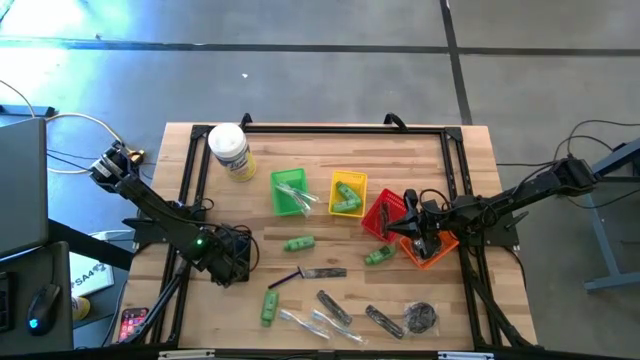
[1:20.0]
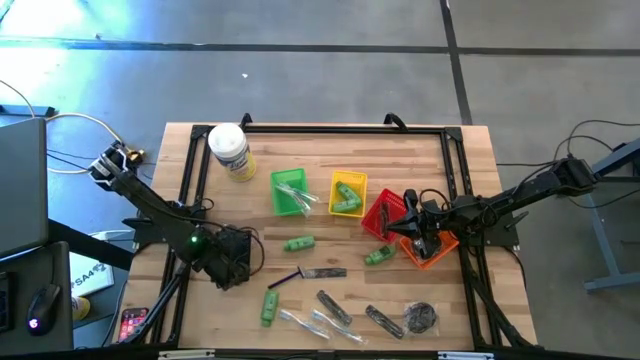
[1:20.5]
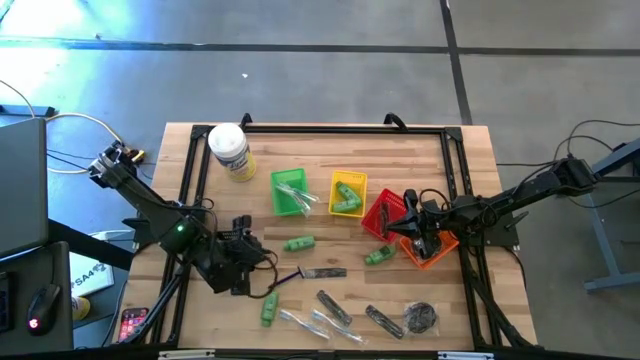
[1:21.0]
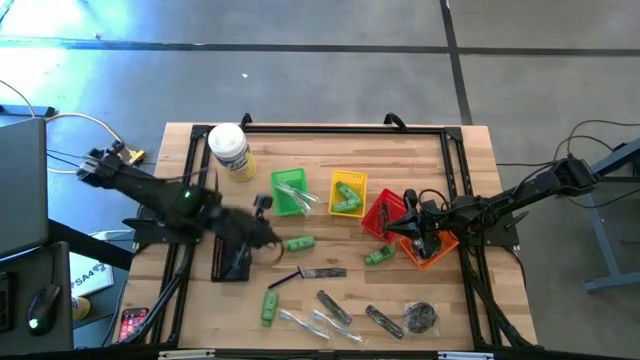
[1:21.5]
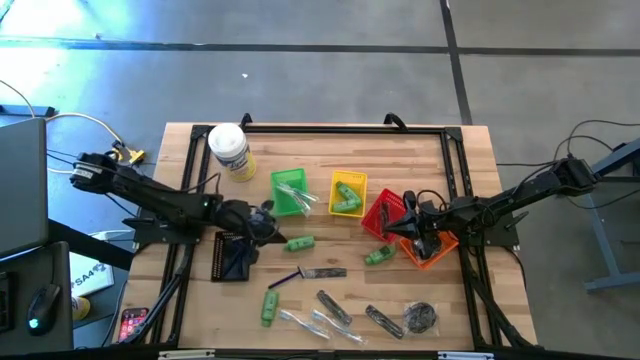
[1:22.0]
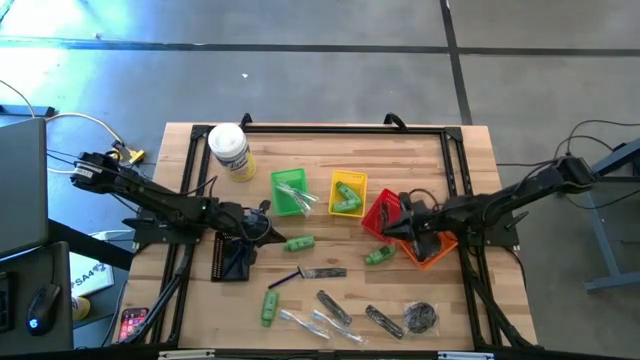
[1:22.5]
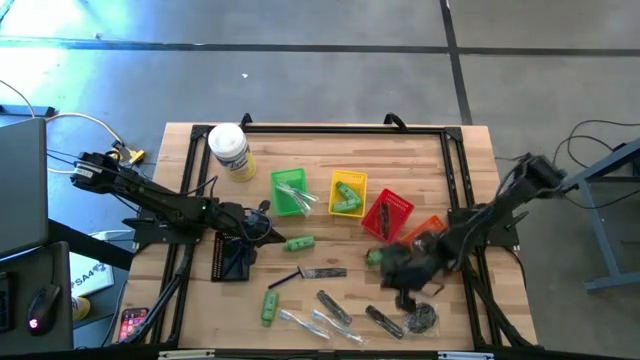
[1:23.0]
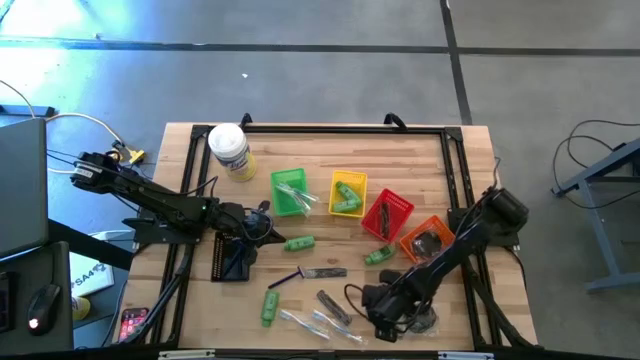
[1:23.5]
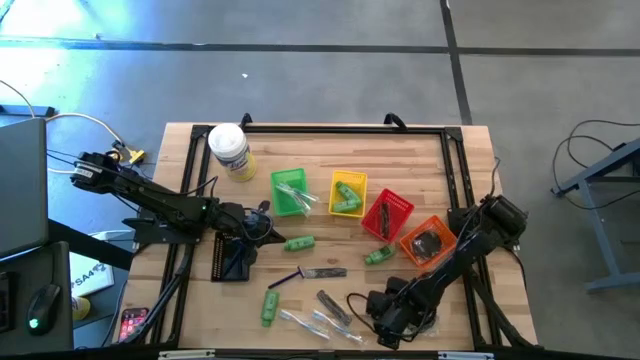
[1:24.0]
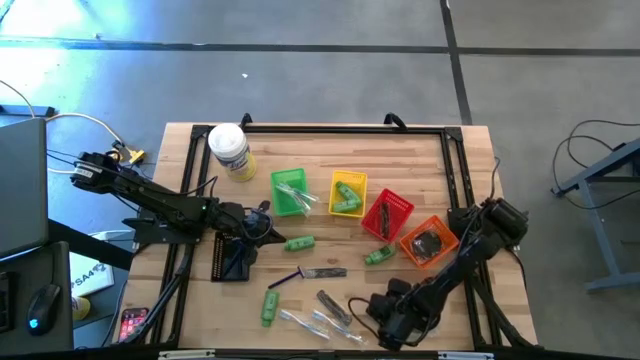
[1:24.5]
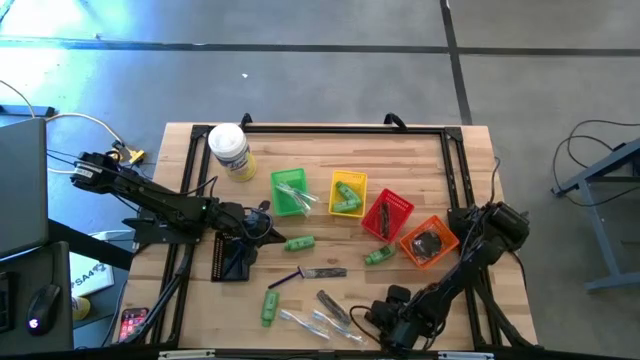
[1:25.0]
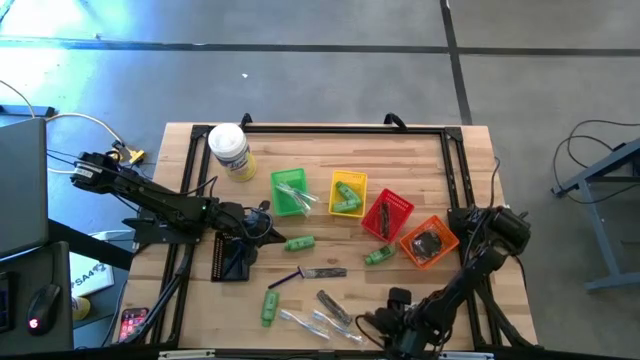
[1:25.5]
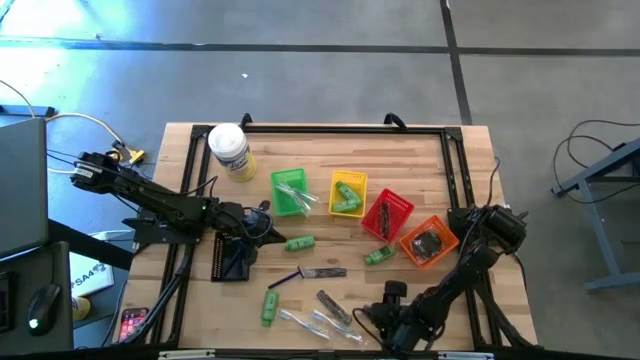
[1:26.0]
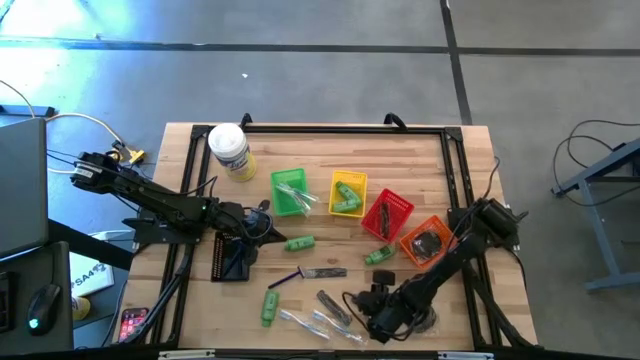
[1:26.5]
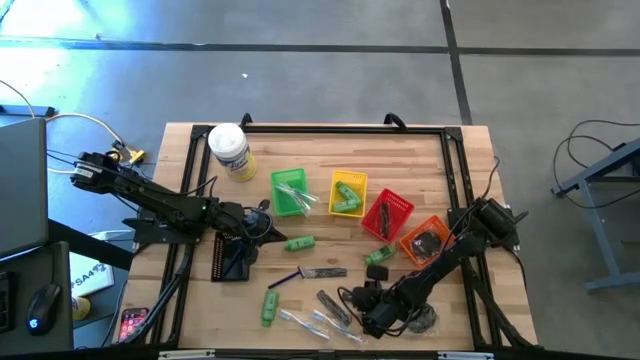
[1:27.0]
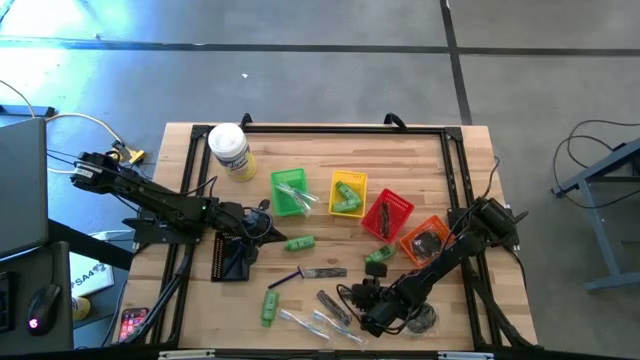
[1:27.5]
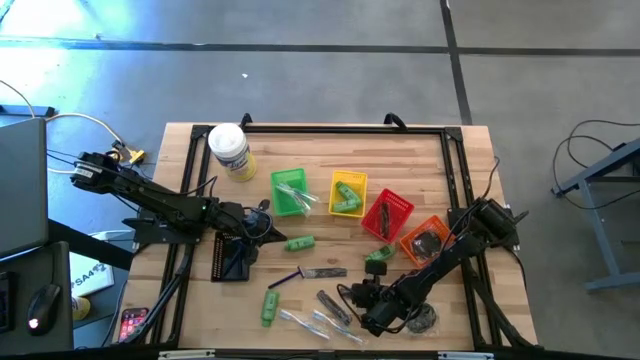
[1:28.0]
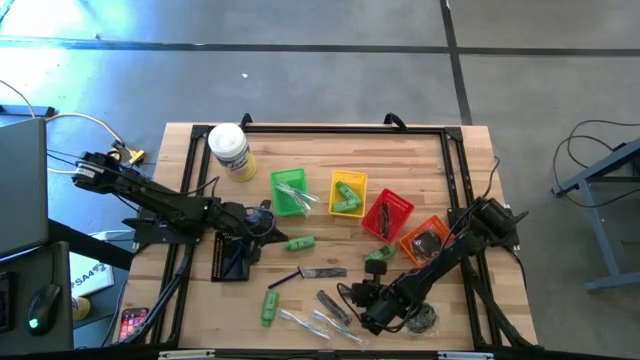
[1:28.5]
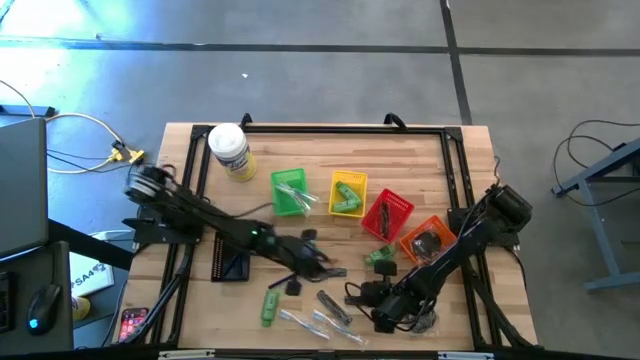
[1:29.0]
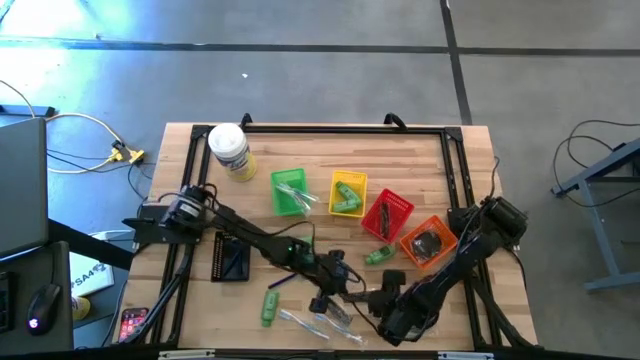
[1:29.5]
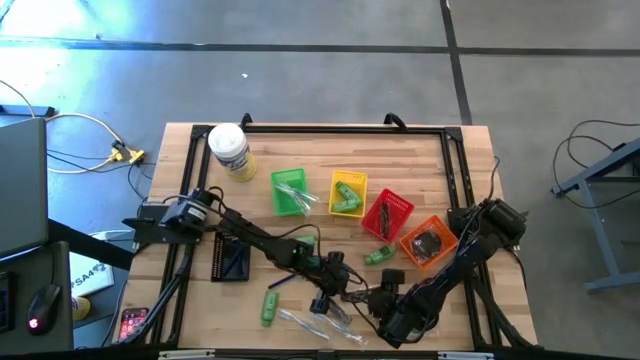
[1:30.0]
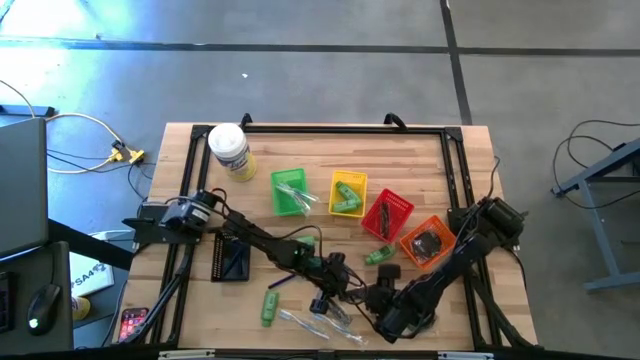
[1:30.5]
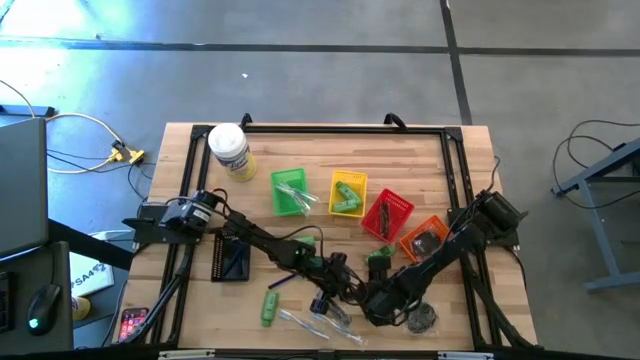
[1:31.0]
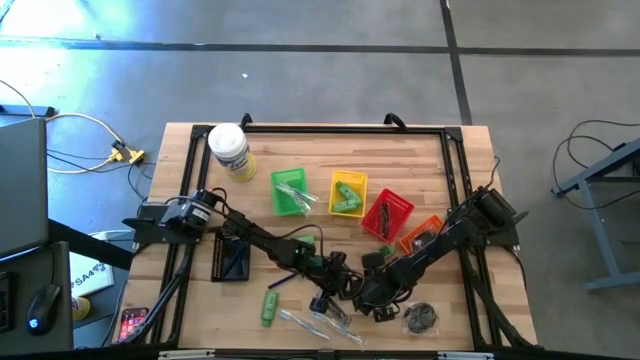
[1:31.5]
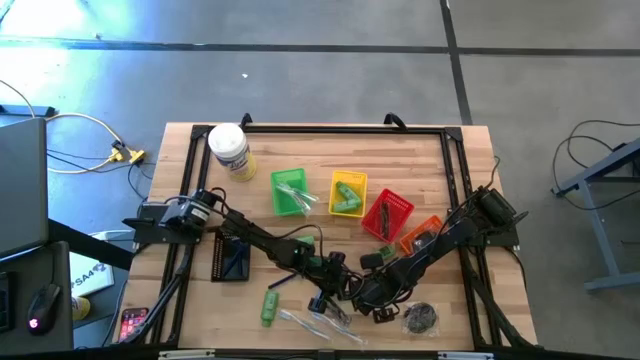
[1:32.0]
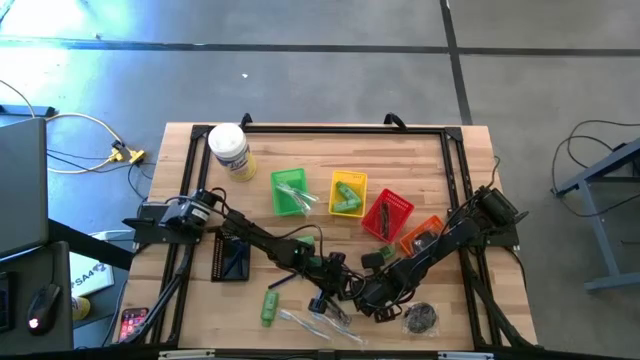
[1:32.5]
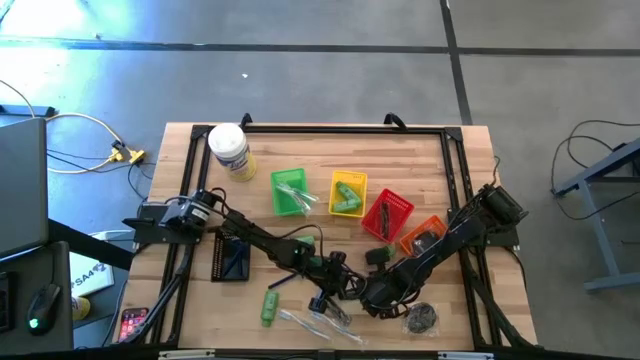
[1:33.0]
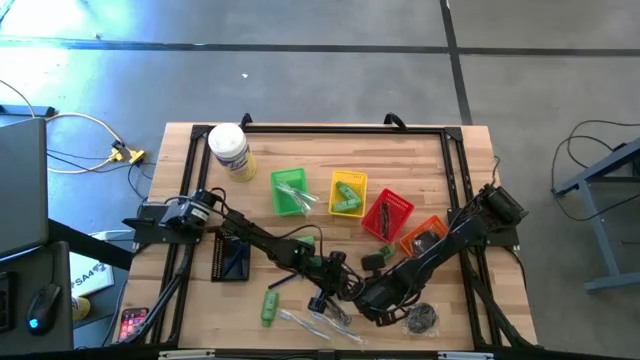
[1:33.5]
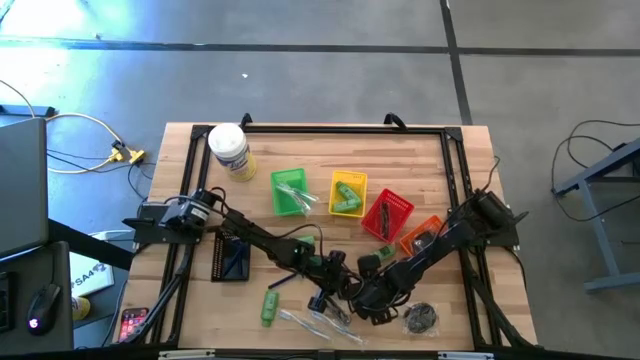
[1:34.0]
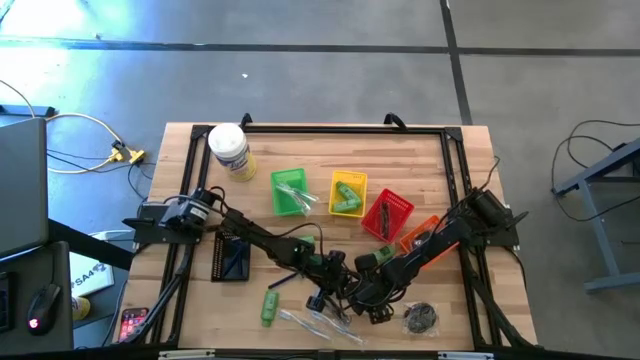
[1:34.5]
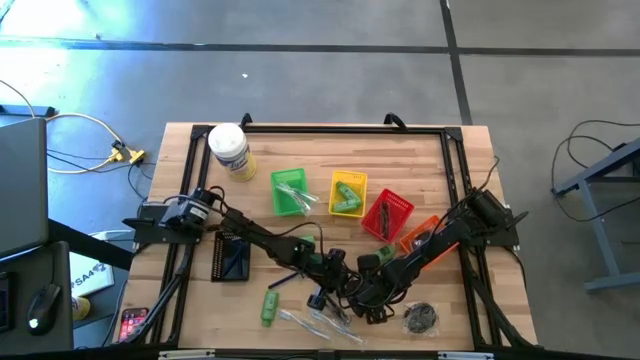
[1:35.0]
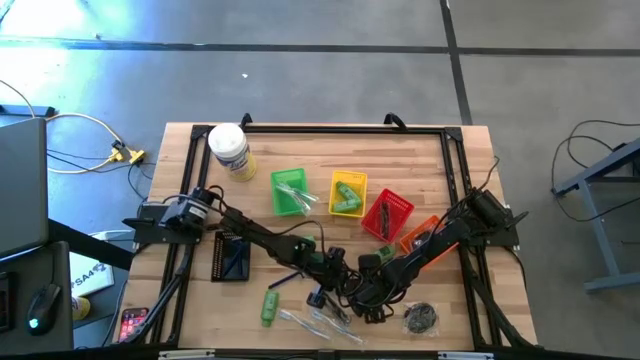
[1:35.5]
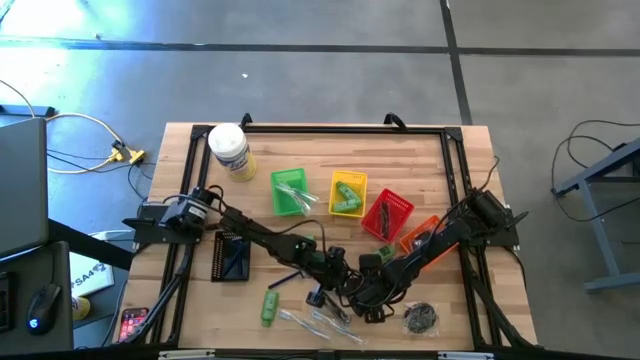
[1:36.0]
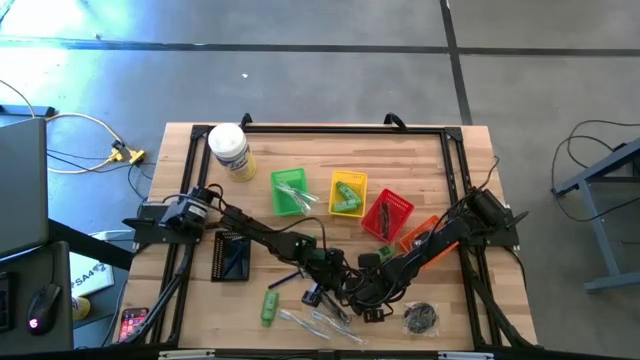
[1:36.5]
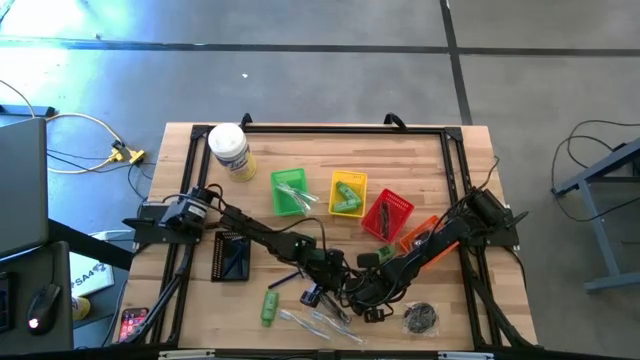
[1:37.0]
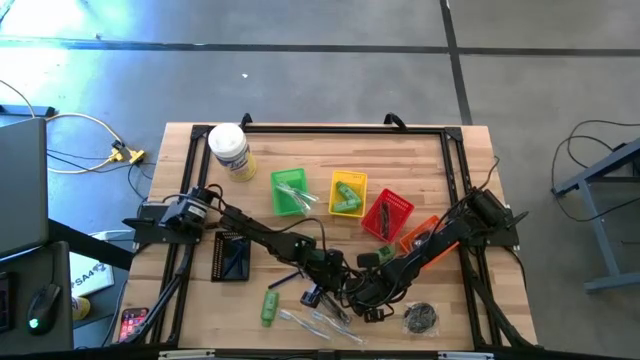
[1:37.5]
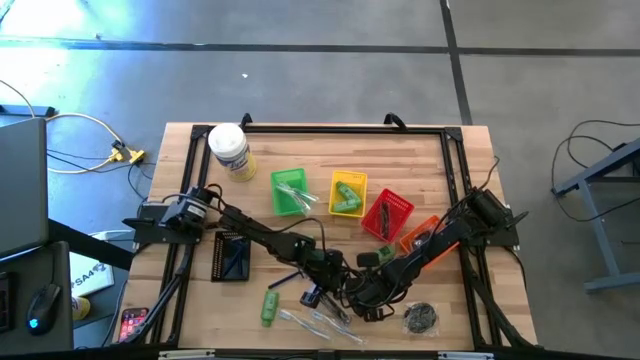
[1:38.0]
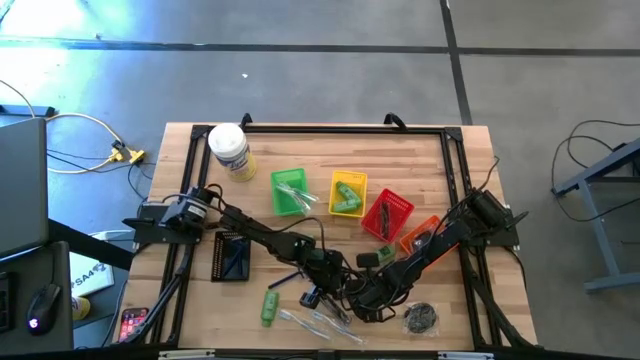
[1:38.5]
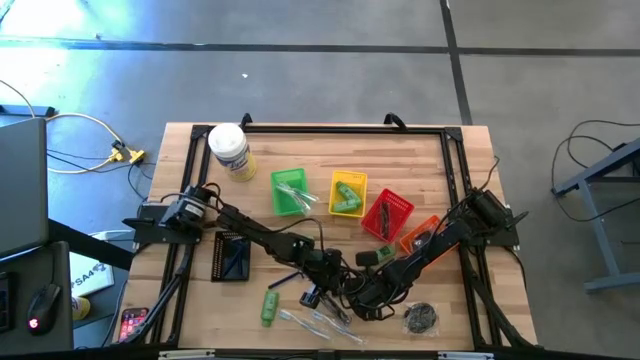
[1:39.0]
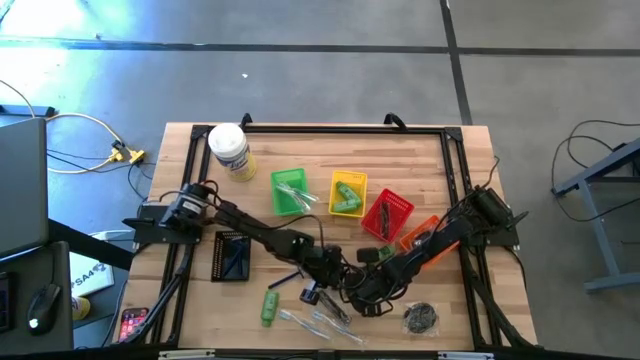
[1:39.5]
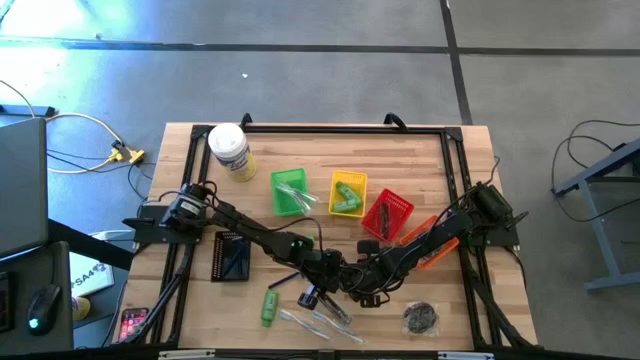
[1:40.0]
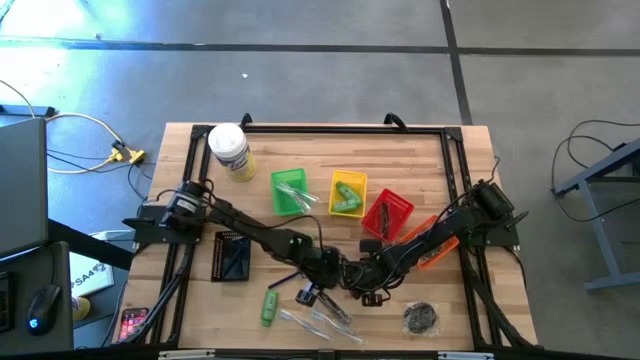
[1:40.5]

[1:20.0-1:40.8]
Task: Pick & Place Travel size toiletries
Put the black hair comb into the red bin
